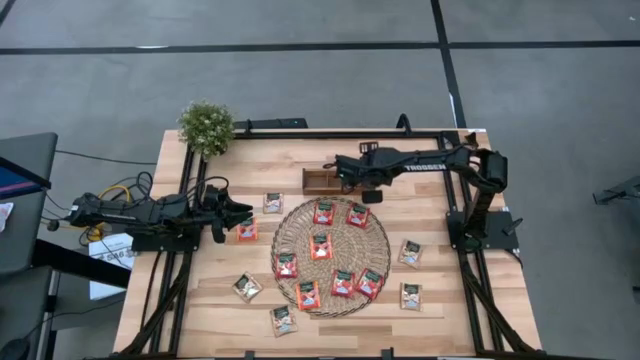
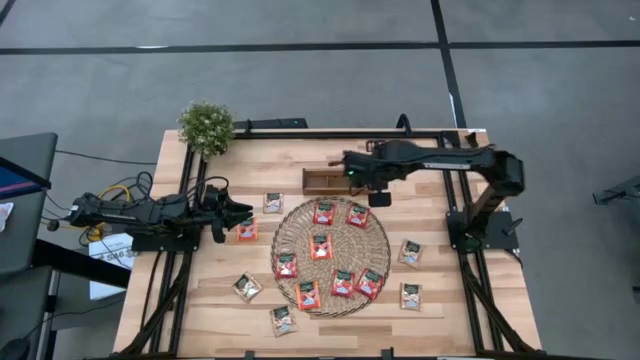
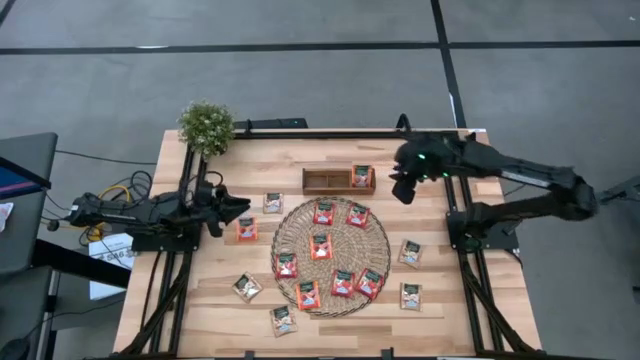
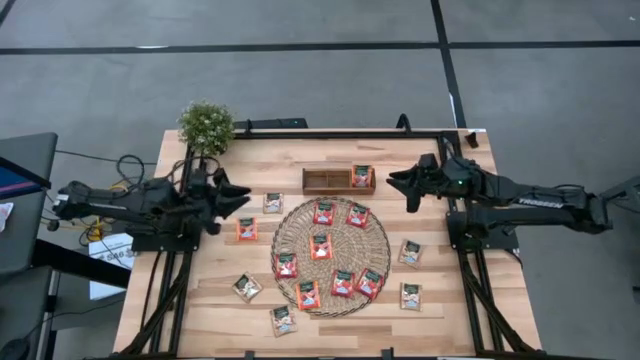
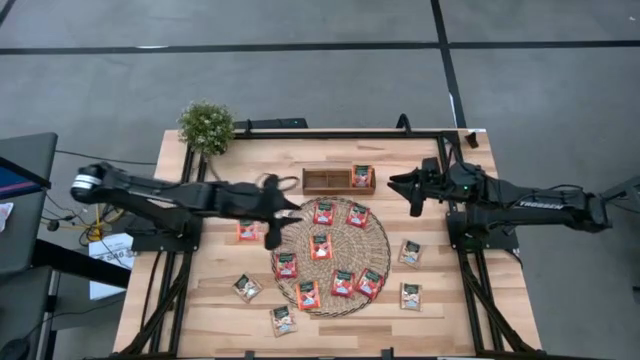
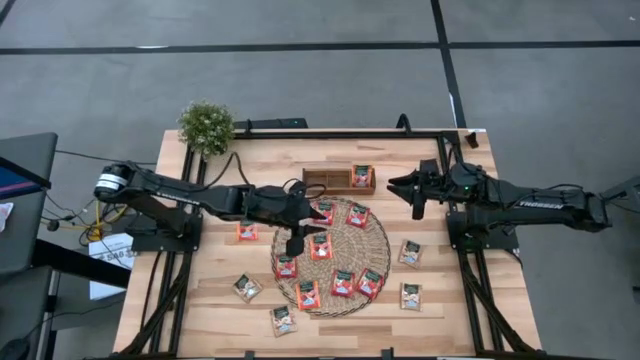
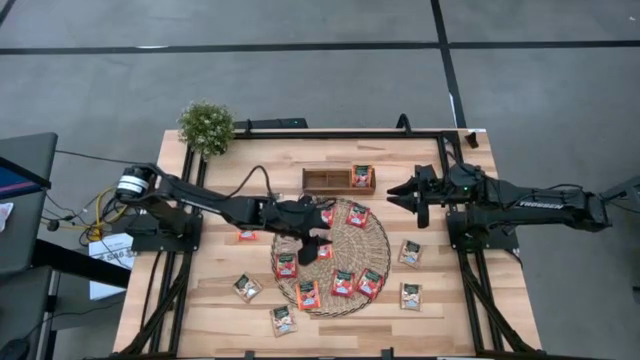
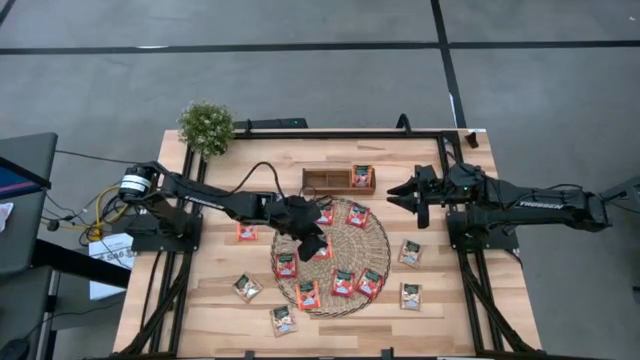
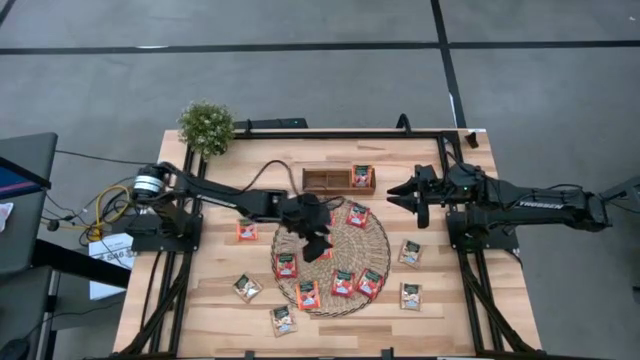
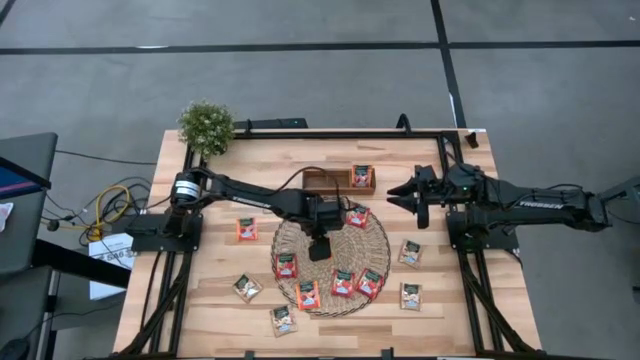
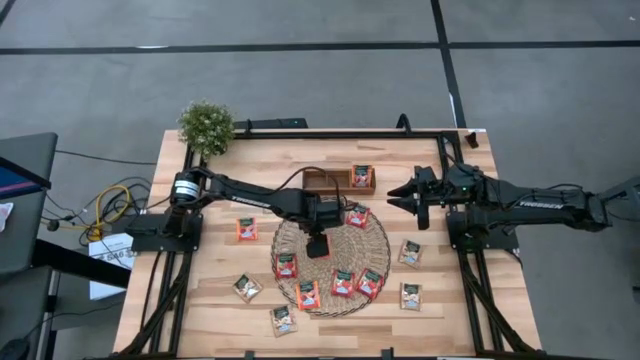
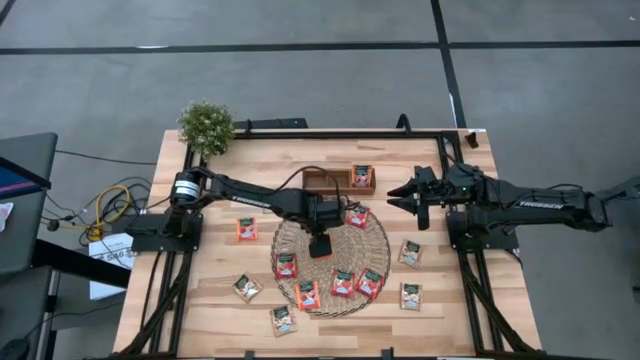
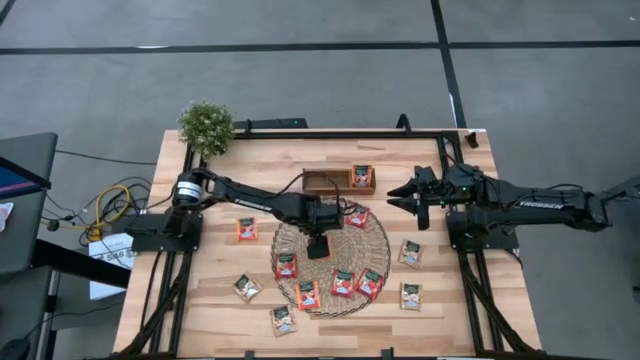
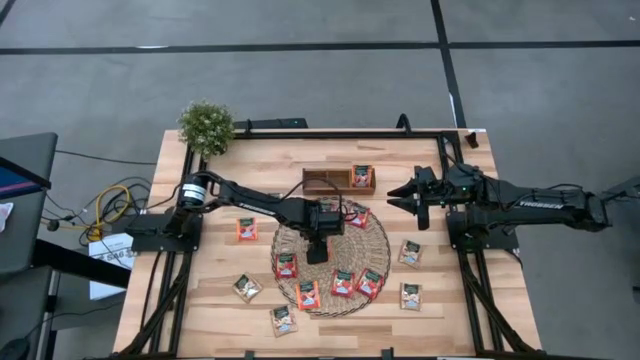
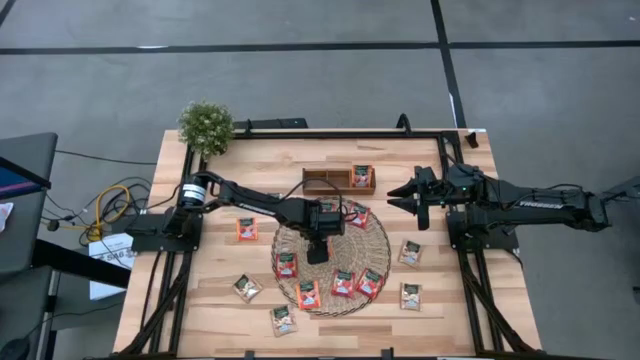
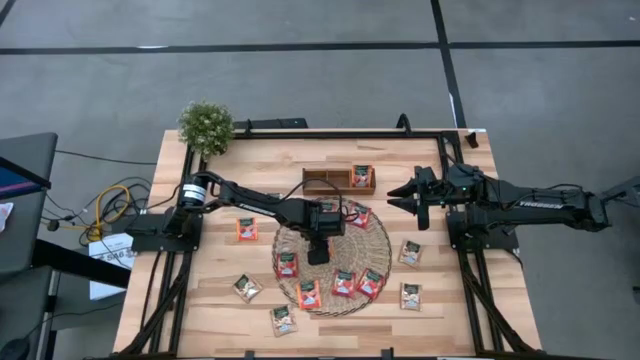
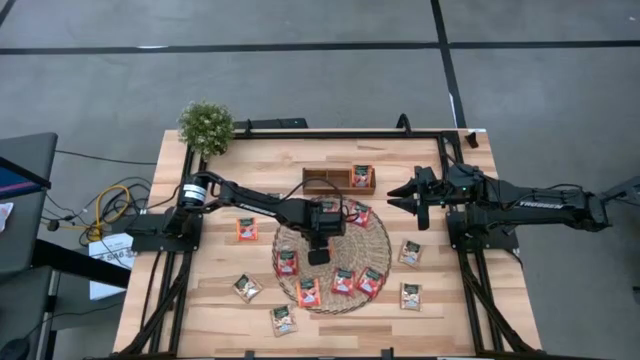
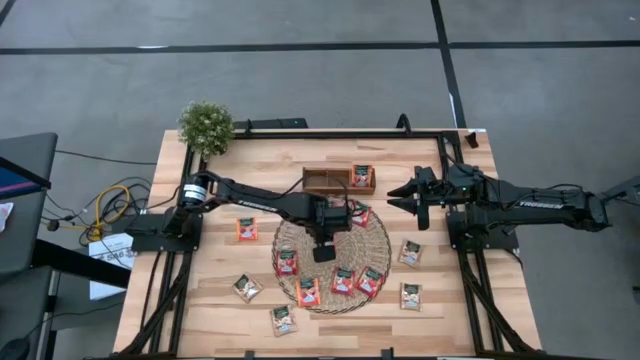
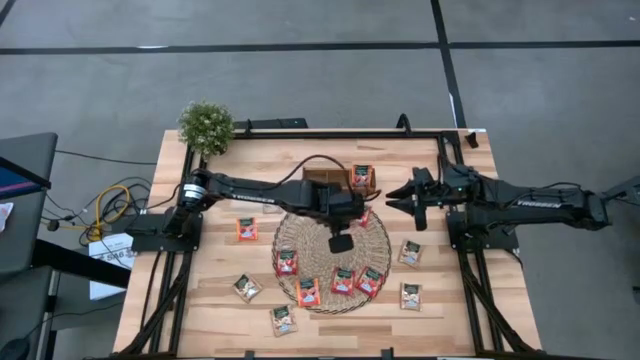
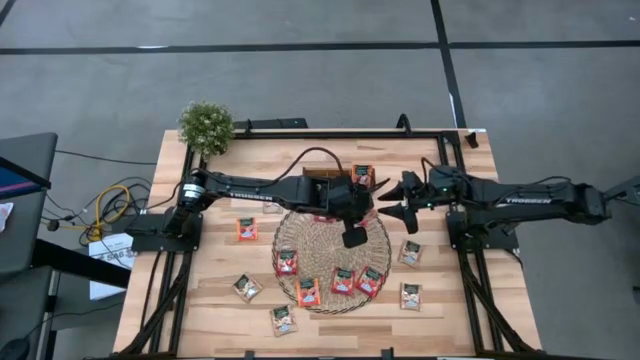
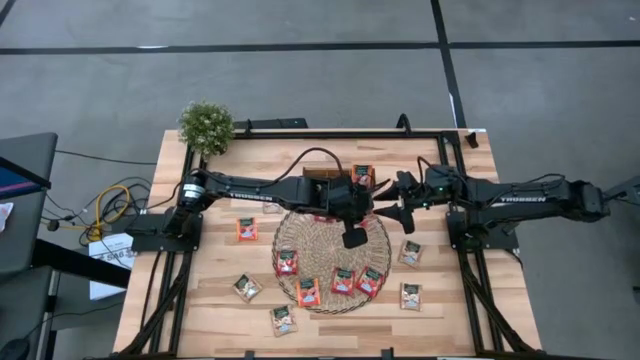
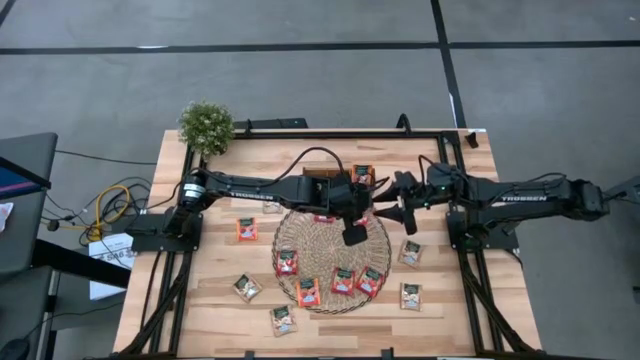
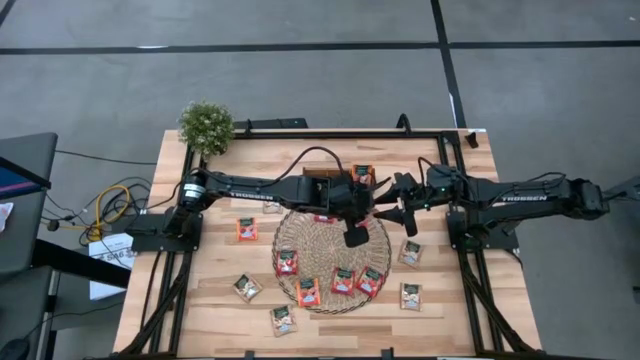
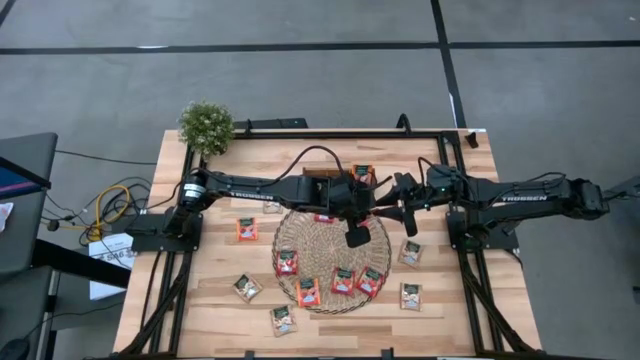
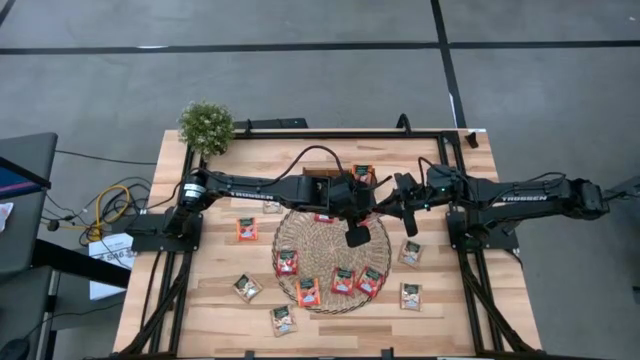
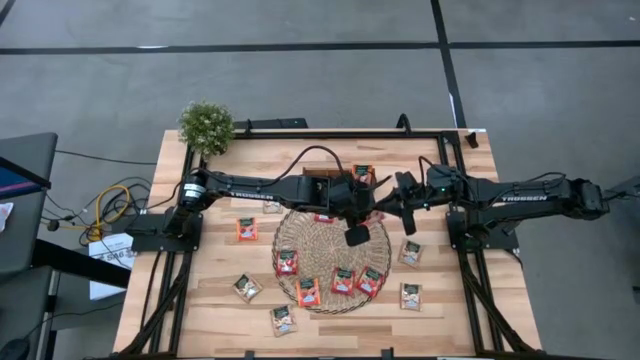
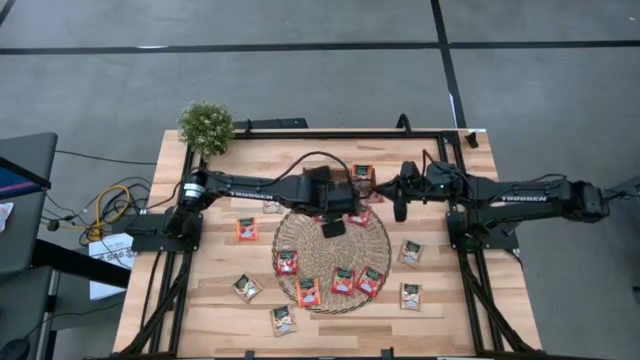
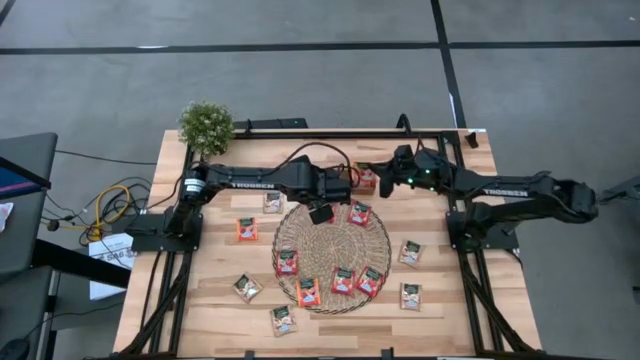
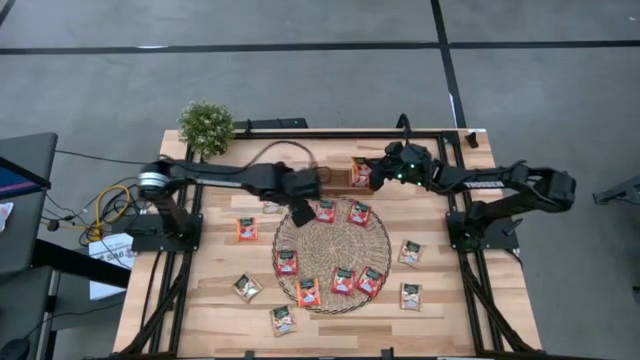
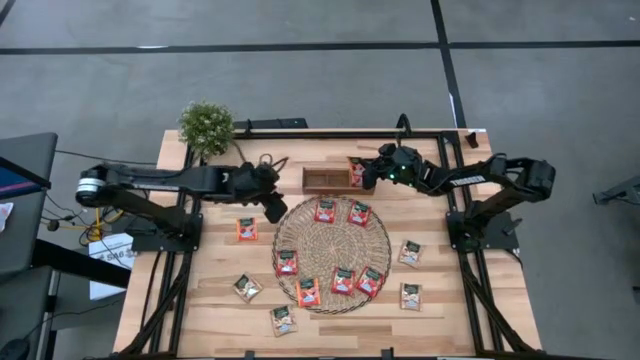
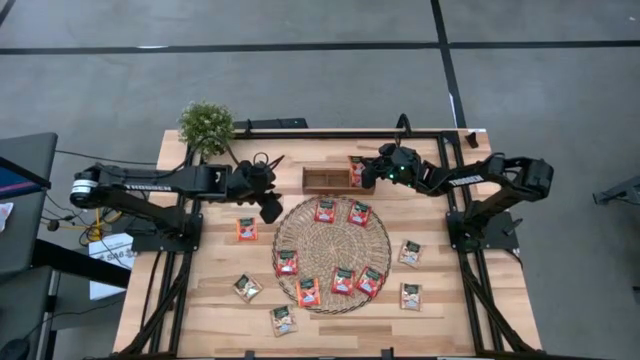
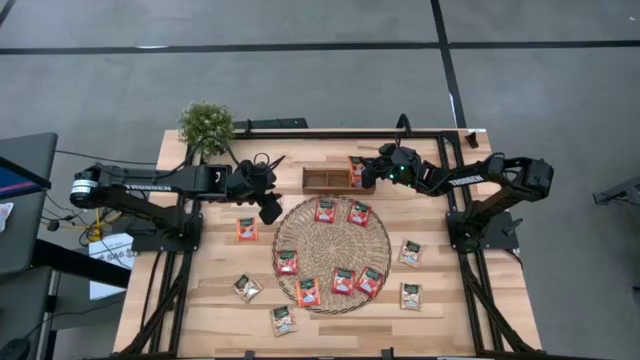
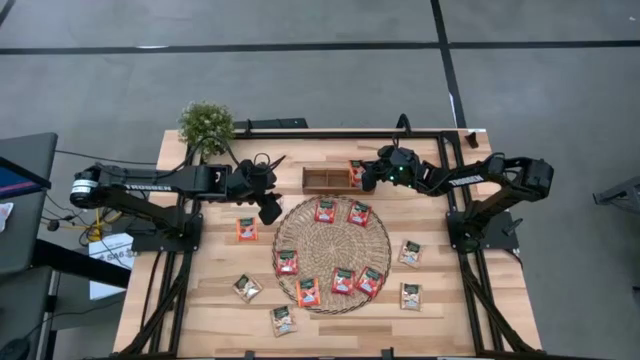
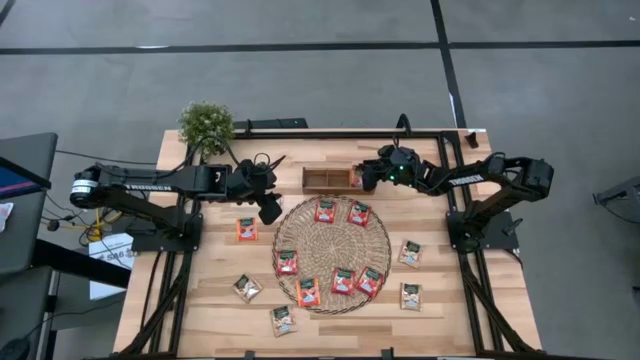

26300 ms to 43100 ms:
Task: Pick & Place Tea
Put the orange tea bag into the right section of the wooden organizer

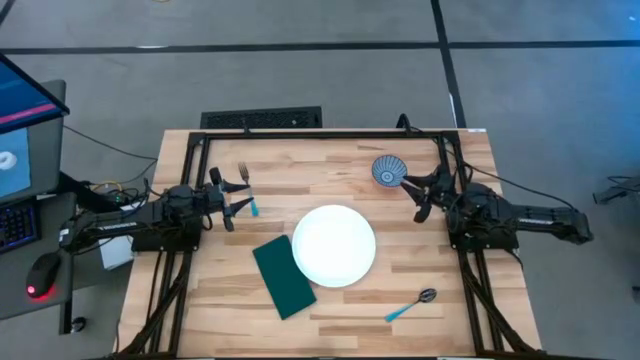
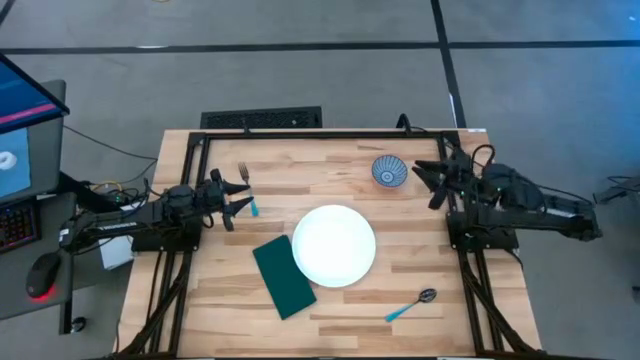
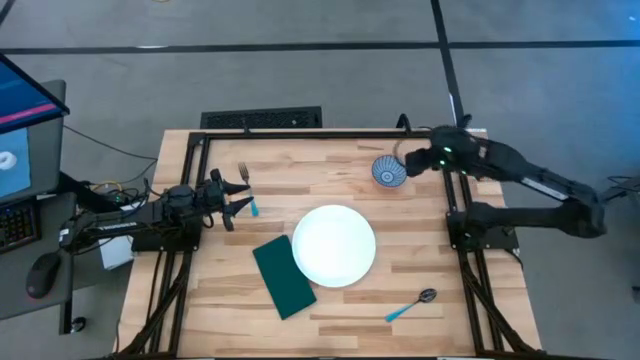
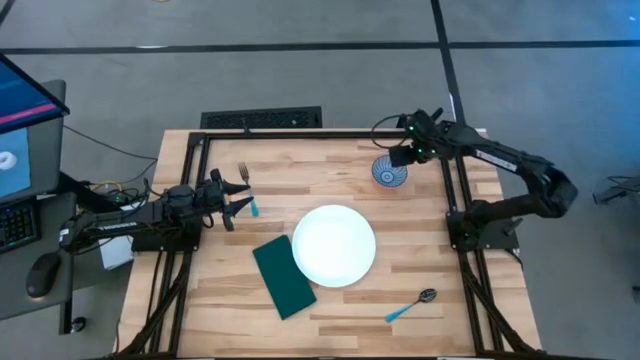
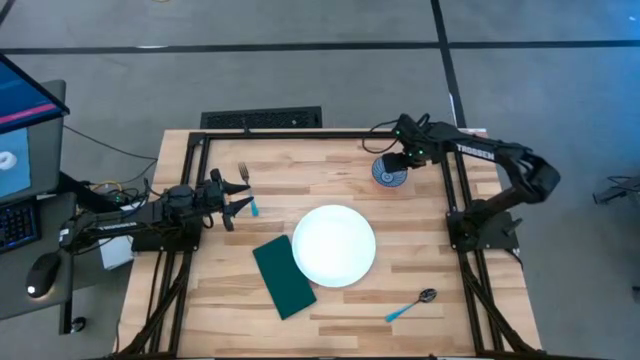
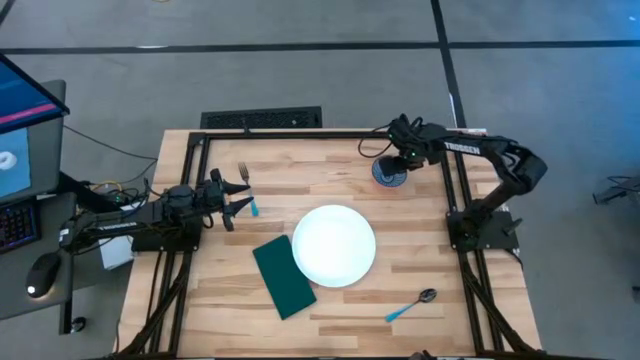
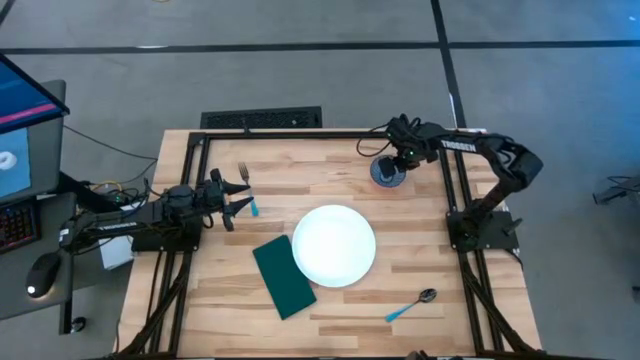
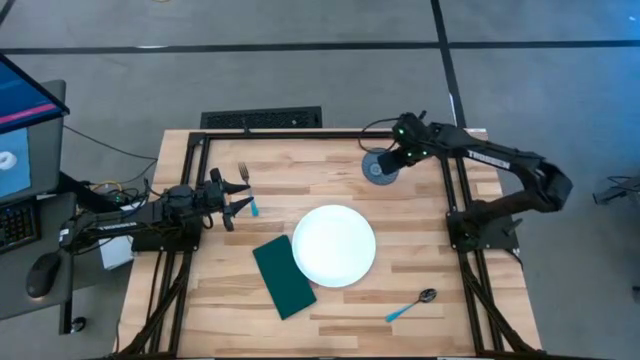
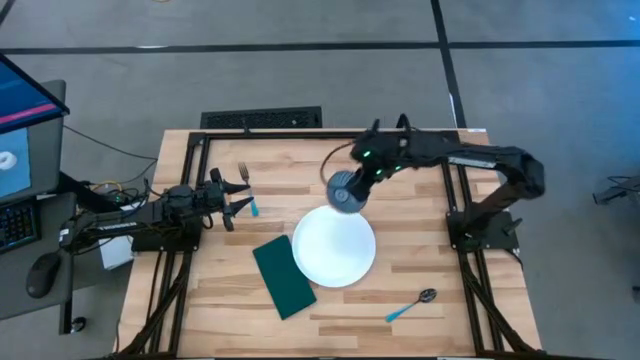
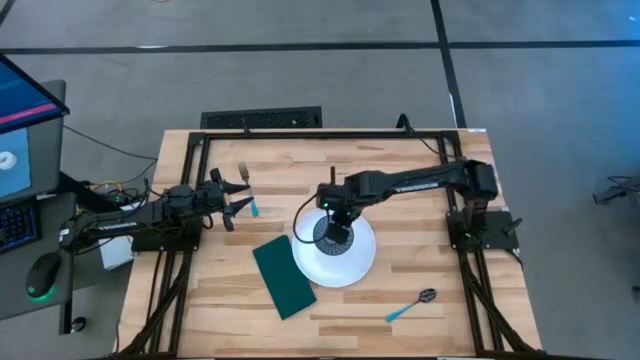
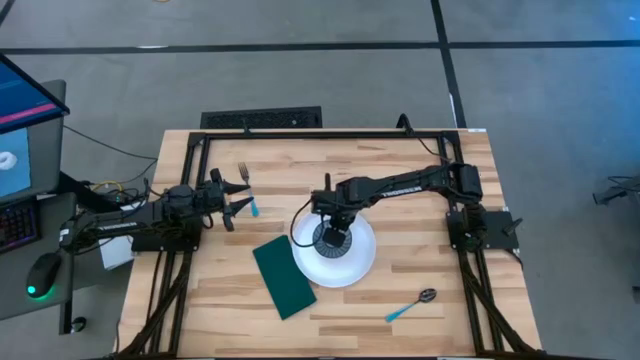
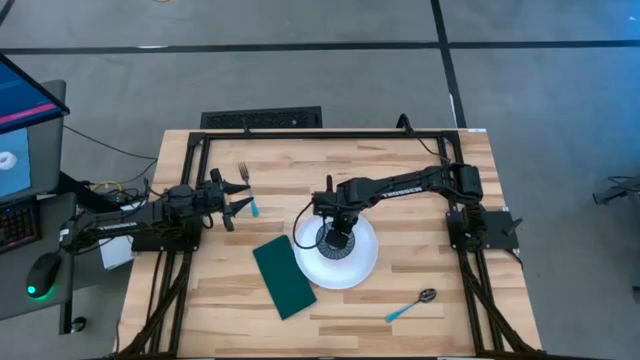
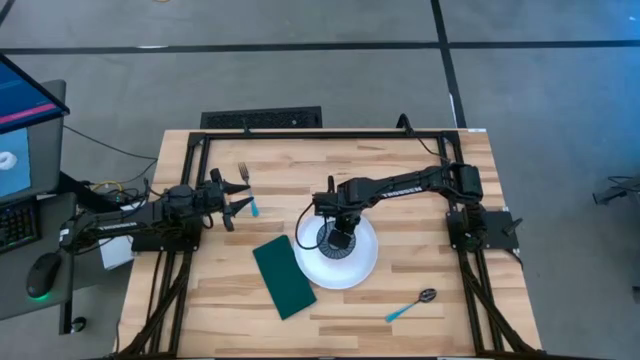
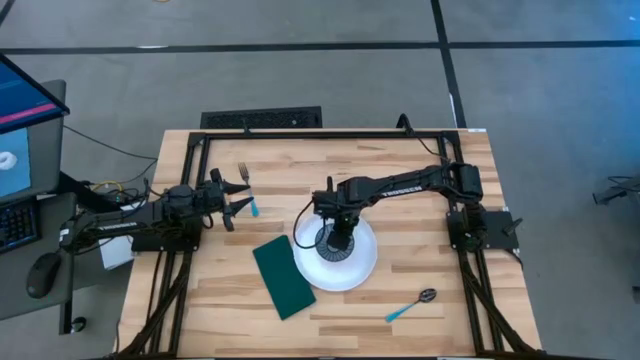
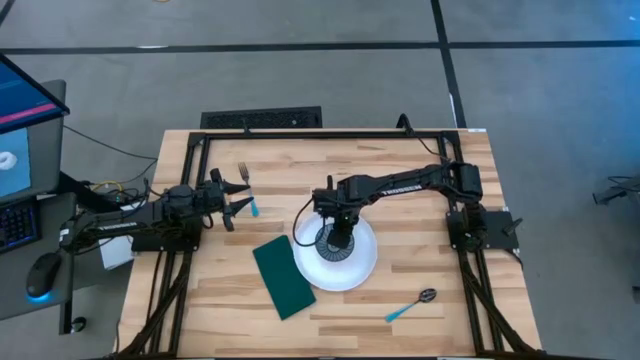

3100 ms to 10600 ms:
Task: Set table place
Put the blue patterned bowl on the white plate
